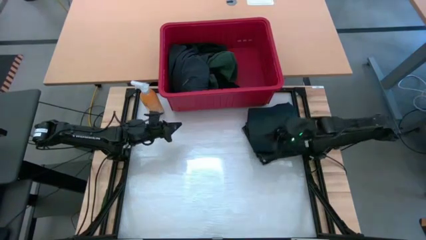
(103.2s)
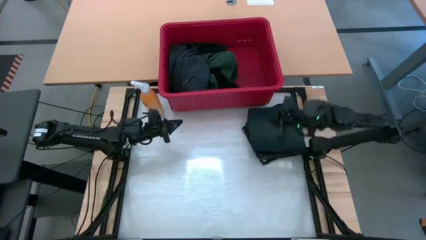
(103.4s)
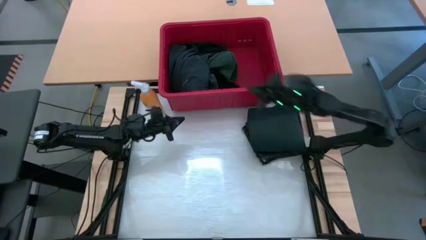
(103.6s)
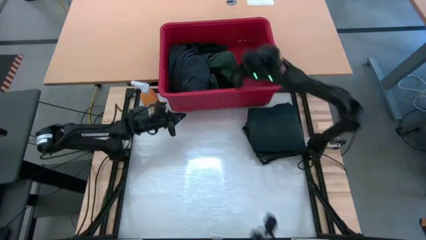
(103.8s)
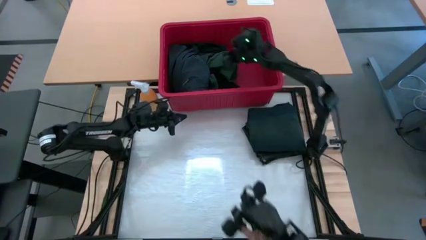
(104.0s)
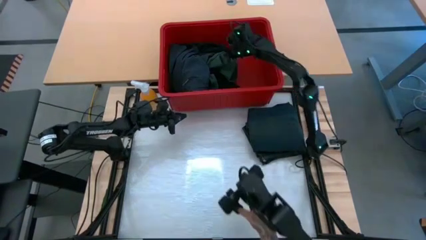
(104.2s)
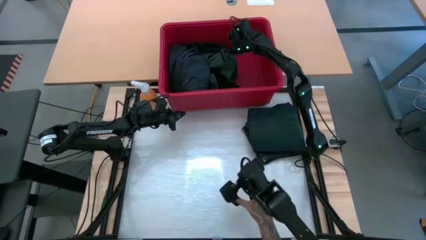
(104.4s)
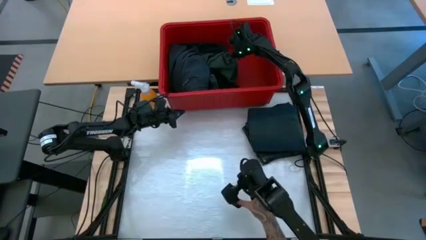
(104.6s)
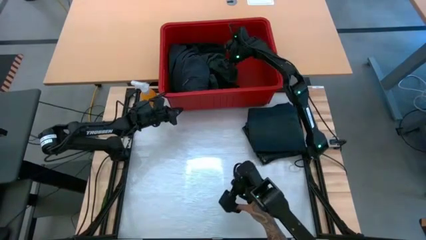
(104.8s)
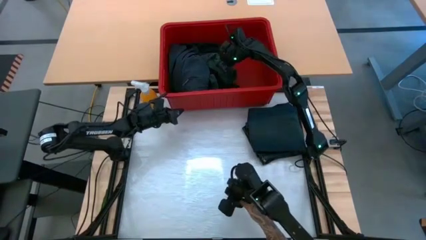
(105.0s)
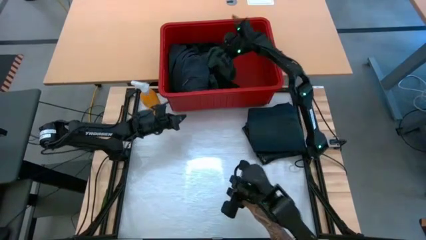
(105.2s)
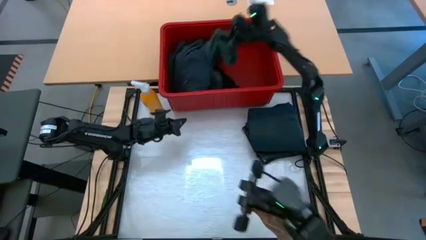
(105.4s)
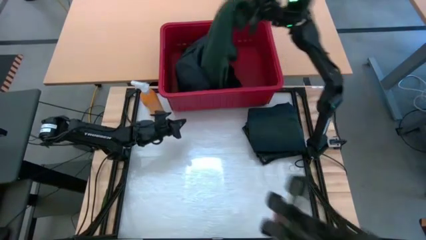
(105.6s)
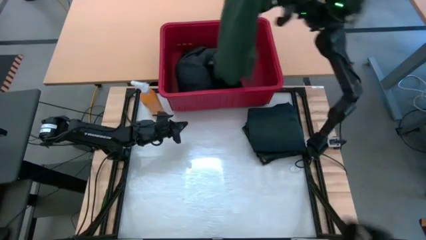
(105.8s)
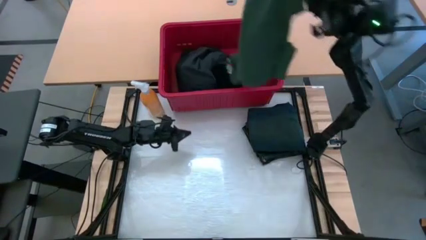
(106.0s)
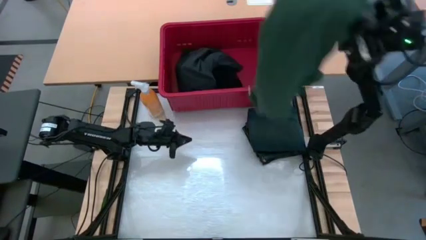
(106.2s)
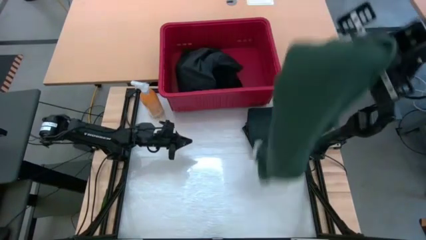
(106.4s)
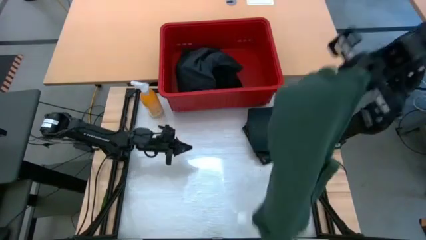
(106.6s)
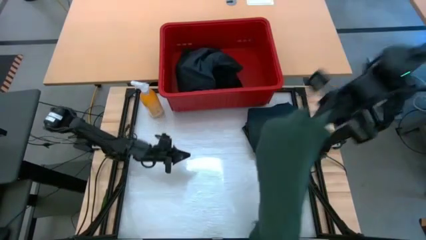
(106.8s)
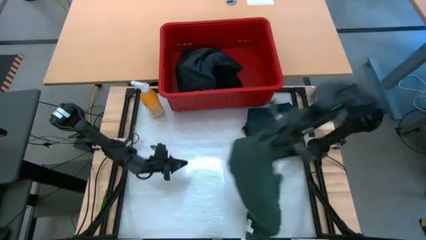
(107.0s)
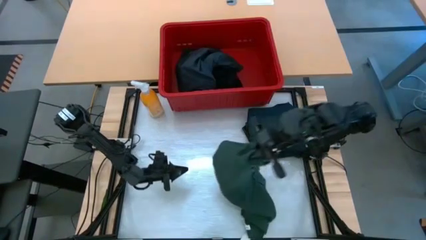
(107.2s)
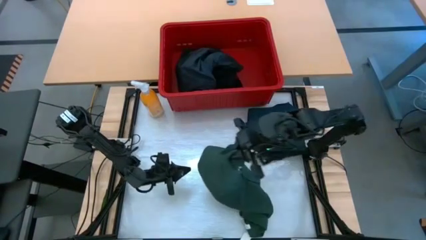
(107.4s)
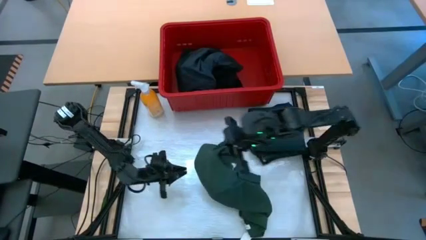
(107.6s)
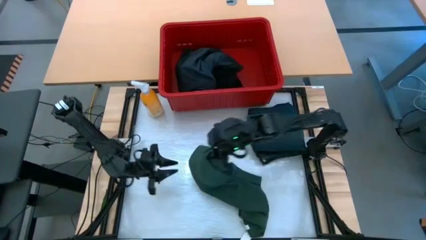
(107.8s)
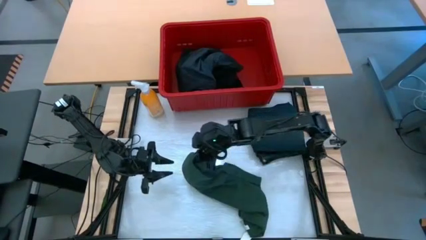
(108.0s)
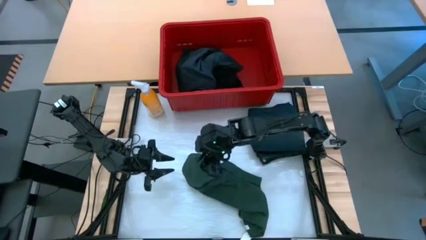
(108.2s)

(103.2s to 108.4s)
Task: Fold Laundry from Bin
Remove the green shirt from the red bin

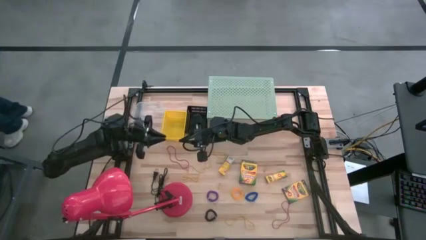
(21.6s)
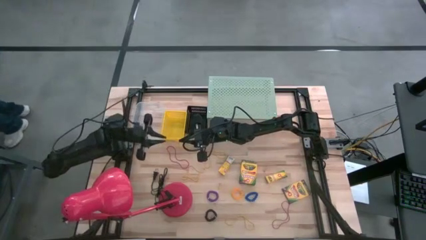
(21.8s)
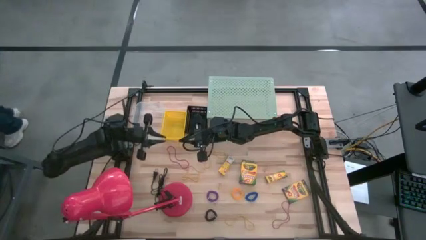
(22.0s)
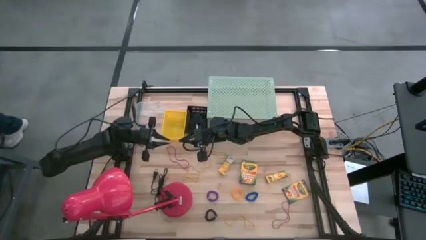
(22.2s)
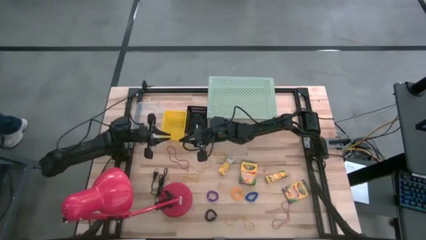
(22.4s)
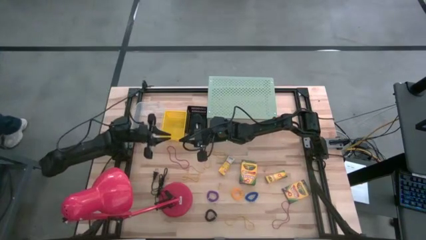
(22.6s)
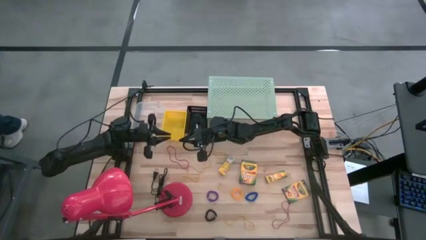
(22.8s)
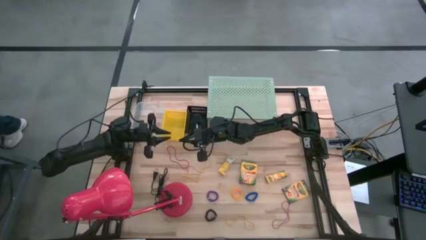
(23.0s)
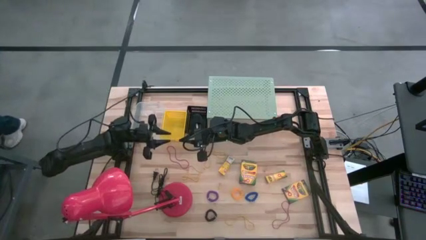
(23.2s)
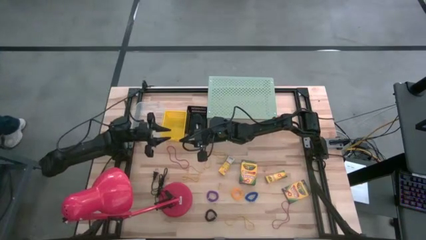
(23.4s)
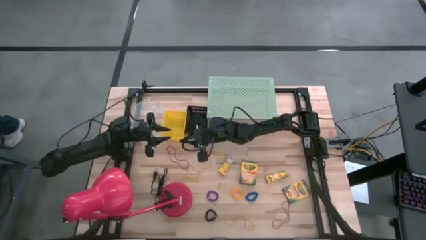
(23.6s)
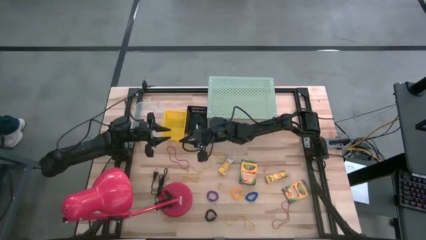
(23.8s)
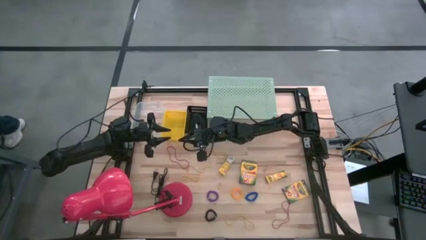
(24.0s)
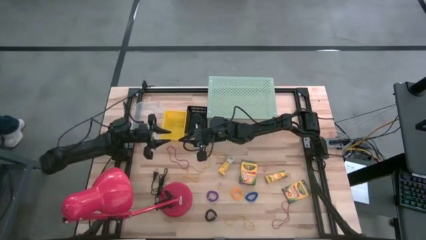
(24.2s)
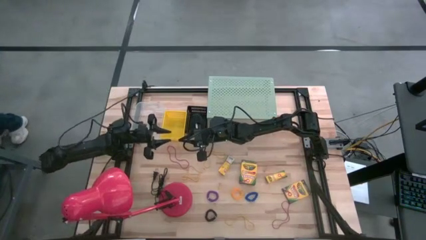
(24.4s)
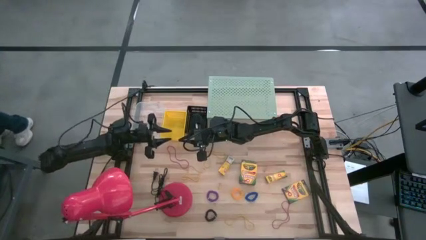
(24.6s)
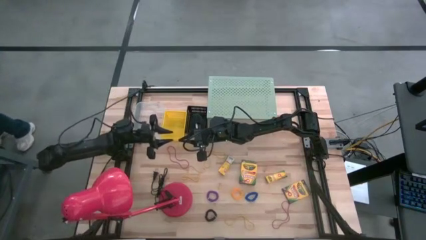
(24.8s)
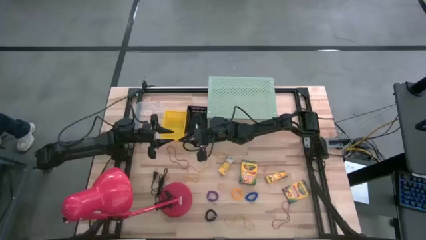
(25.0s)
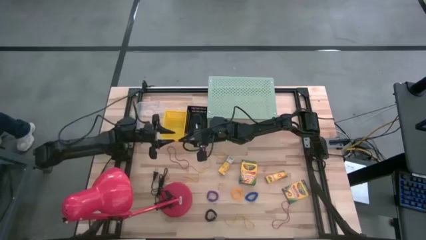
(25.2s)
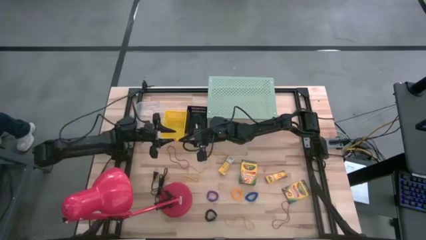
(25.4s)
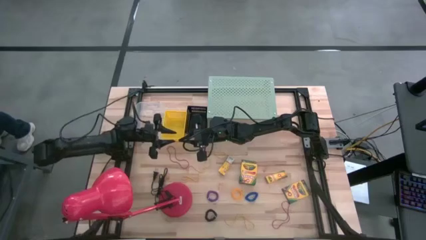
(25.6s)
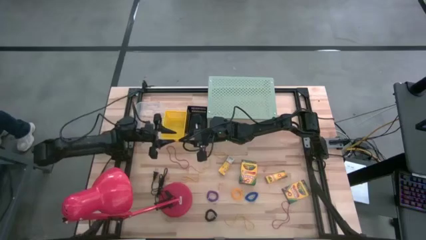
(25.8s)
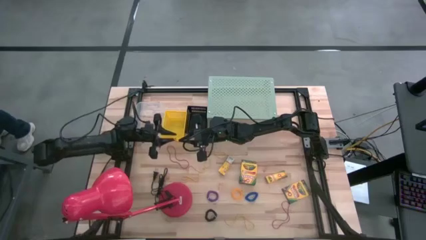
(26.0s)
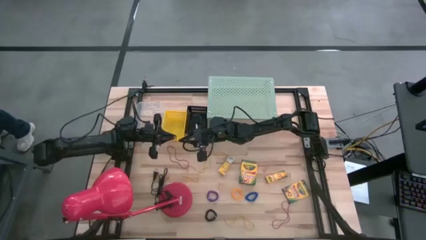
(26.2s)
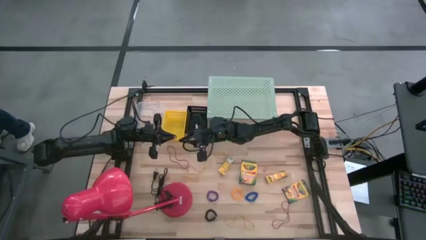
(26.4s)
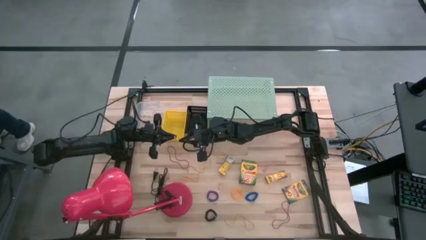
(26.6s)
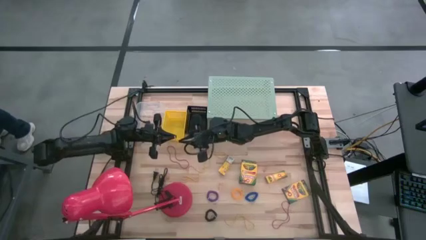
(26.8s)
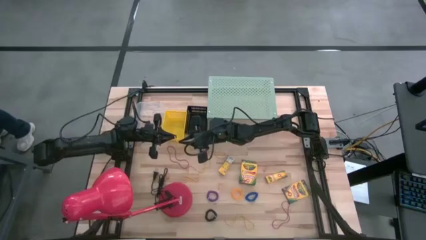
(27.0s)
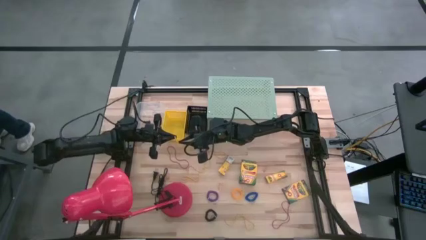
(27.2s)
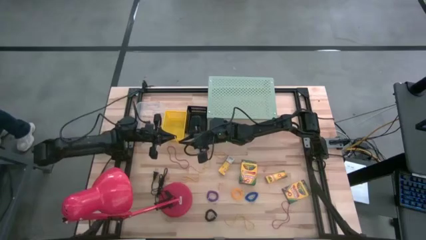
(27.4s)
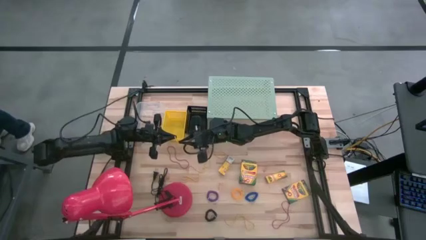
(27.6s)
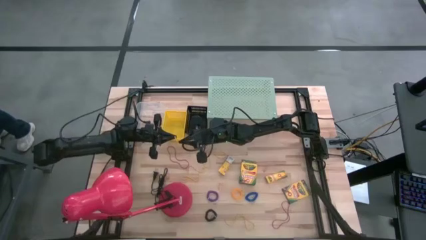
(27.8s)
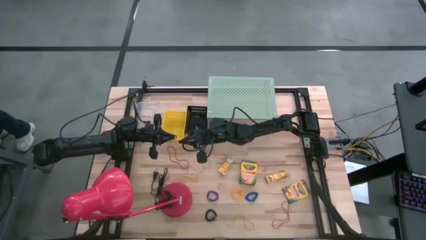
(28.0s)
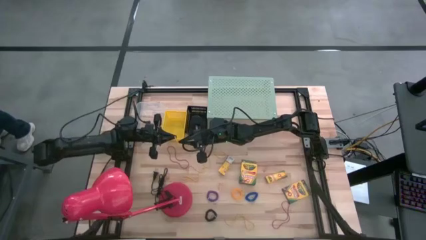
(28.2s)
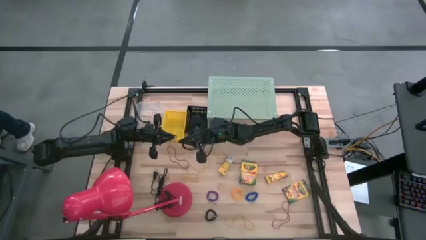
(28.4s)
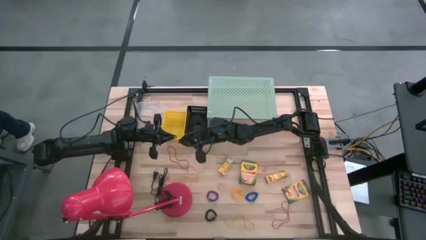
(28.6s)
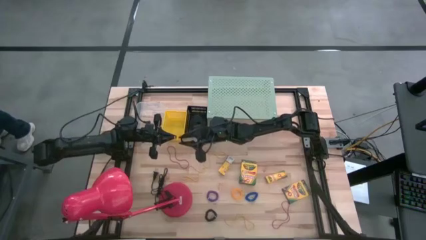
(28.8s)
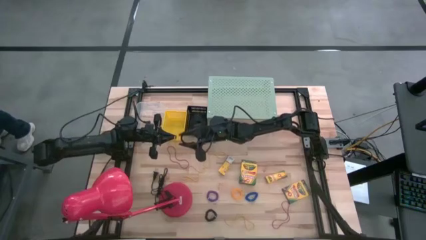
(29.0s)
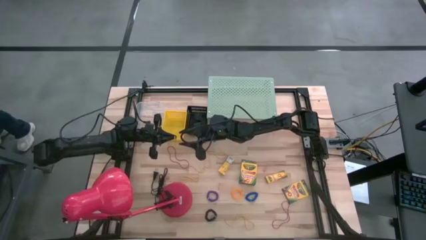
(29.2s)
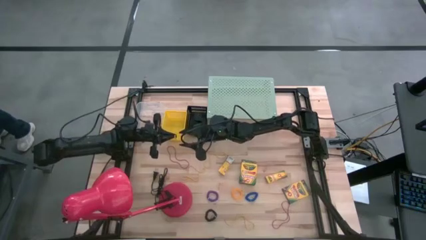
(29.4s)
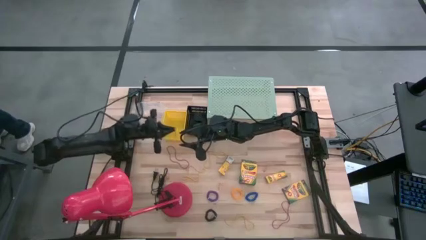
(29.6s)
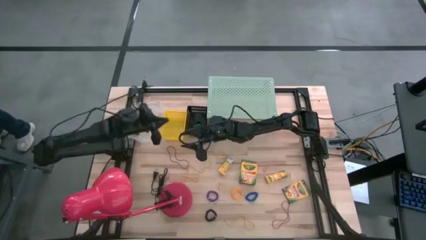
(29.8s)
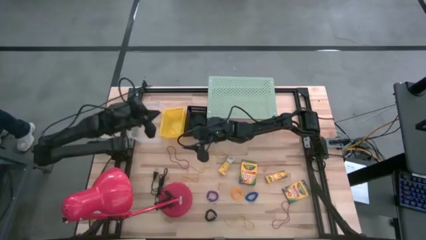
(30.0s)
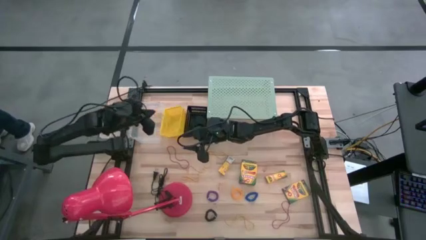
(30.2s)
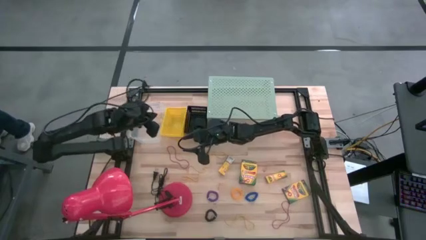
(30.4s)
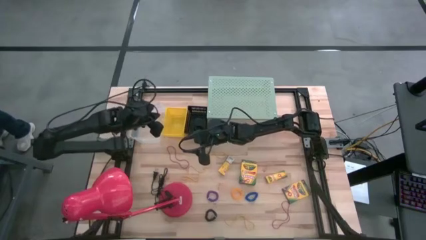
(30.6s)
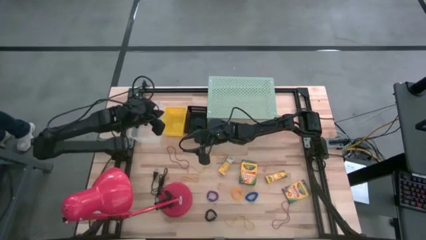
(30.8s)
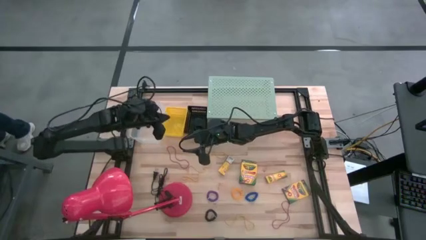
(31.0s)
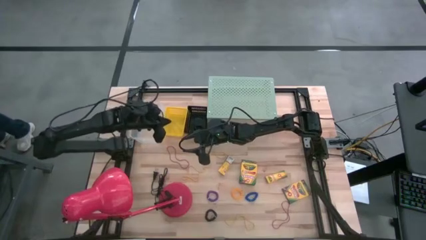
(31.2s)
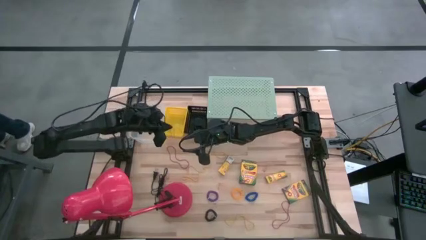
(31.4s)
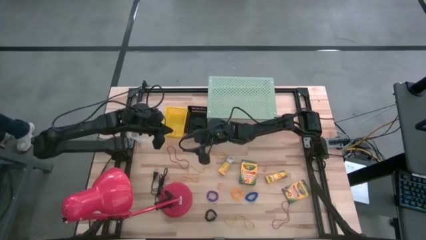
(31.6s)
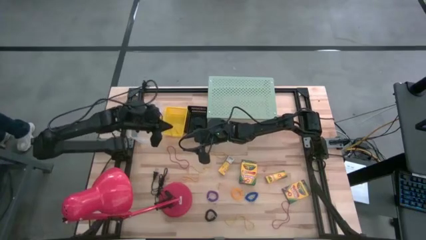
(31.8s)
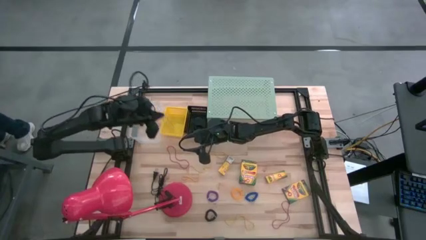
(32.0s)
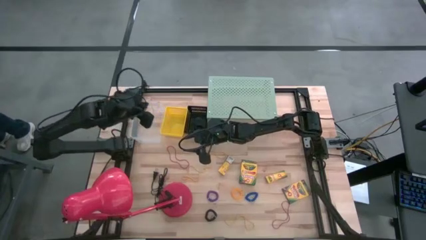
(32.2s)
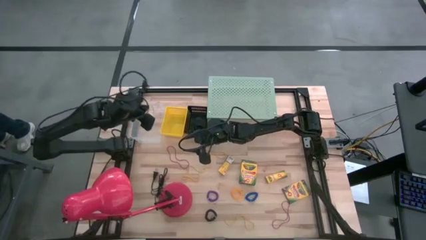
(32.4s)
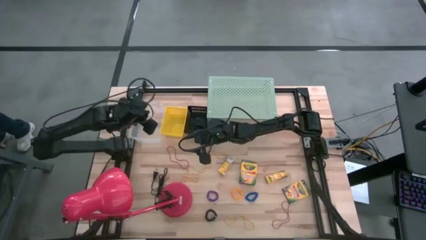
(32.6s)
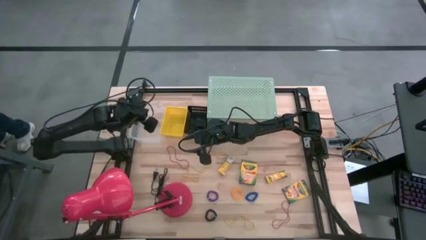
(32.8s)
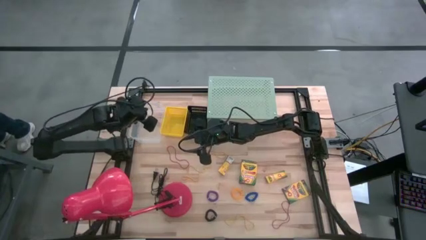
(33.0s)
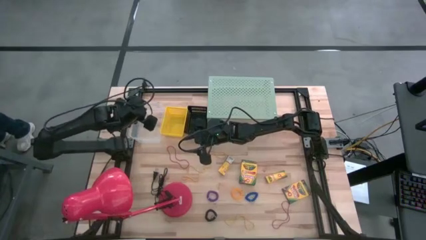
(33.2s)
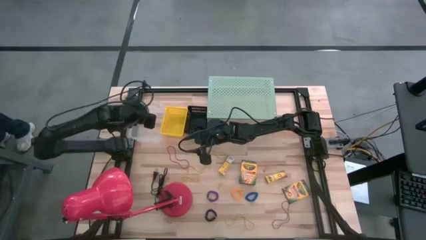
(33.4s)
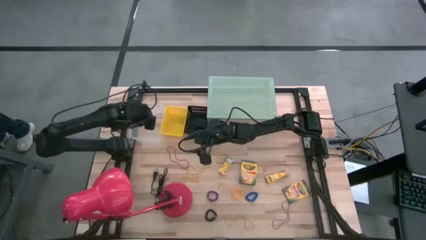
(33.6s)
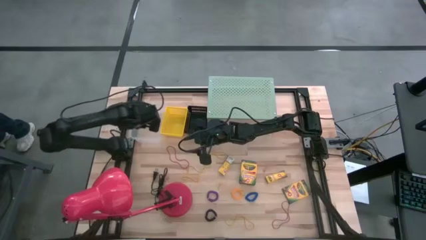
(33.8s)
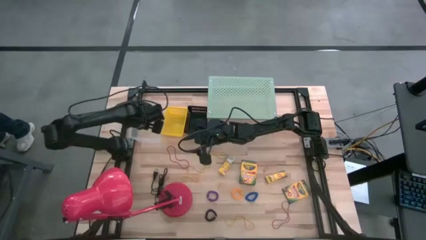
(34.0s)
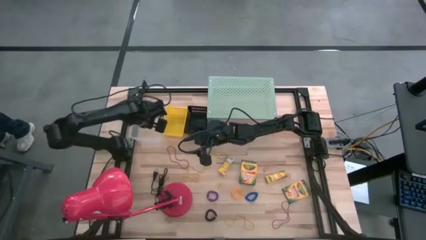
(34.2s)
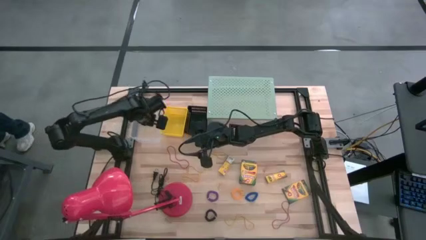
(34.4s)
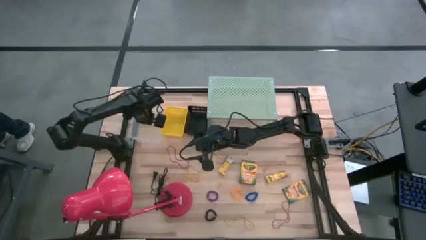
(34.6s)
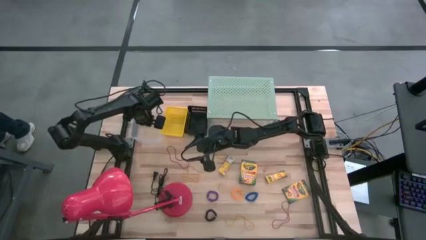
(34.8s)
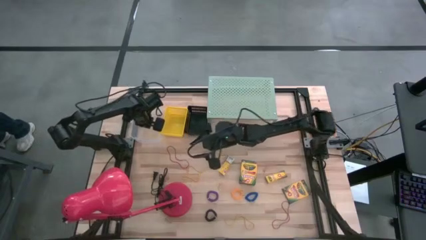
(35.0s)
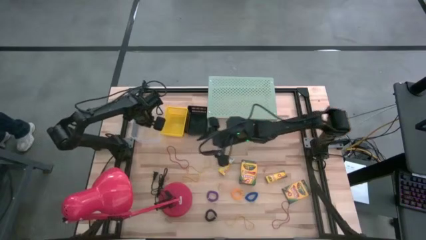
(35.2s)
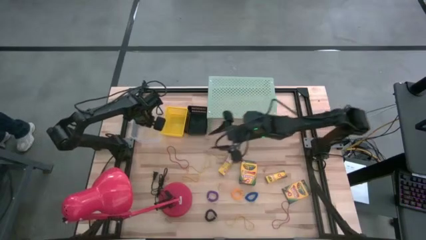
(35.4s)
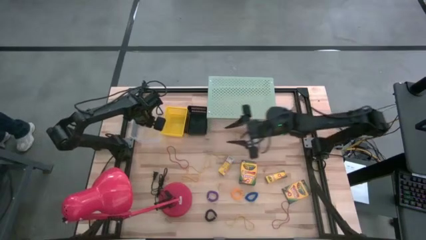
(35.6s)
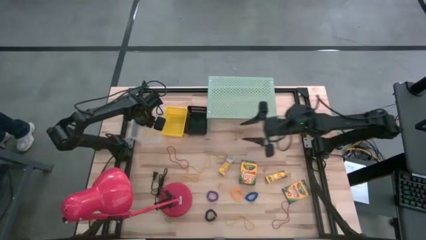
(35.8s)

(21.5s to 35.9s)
Task: Pick & Place Office Desk Supplies
Put the yellow rubber band into the transparent bin
